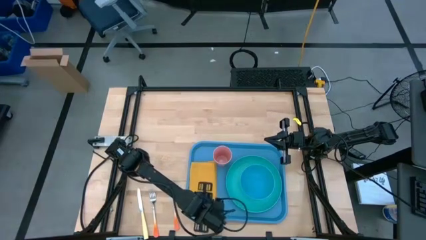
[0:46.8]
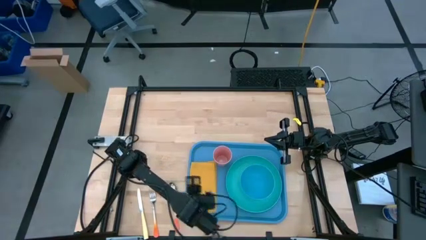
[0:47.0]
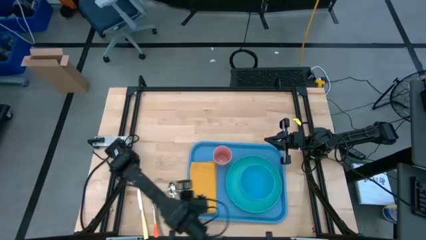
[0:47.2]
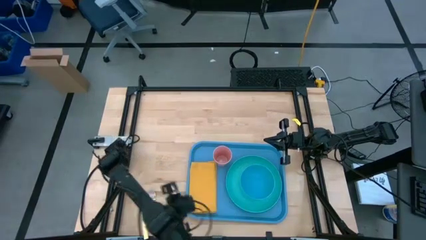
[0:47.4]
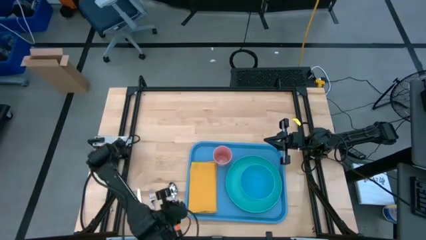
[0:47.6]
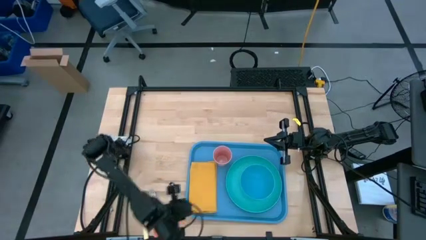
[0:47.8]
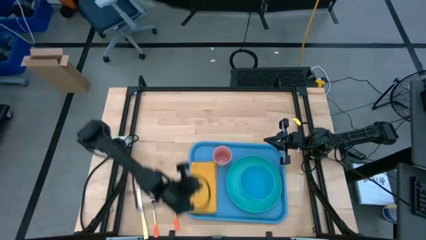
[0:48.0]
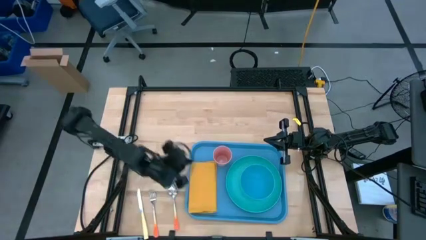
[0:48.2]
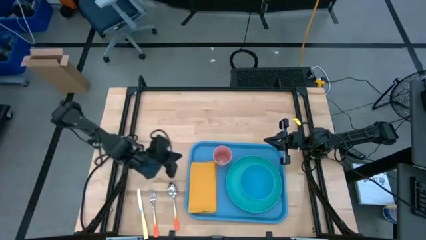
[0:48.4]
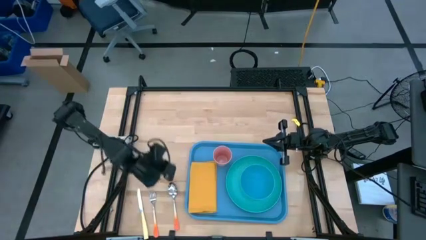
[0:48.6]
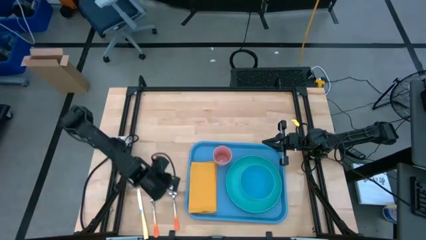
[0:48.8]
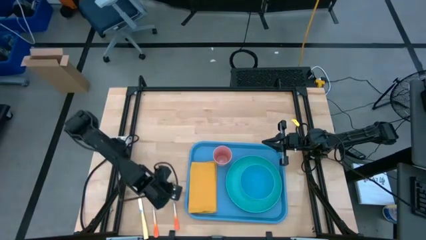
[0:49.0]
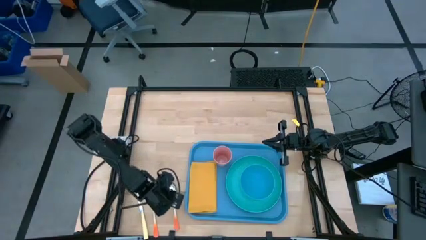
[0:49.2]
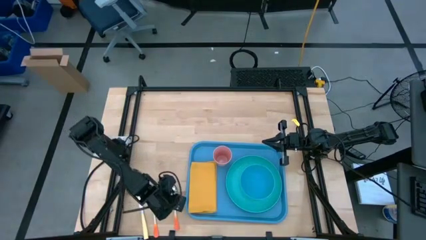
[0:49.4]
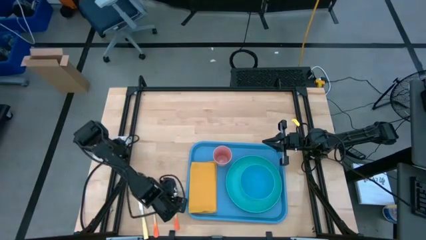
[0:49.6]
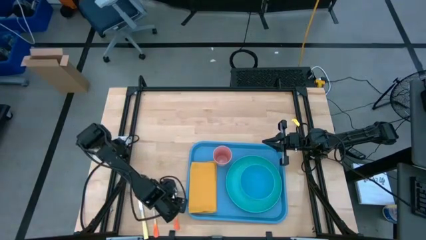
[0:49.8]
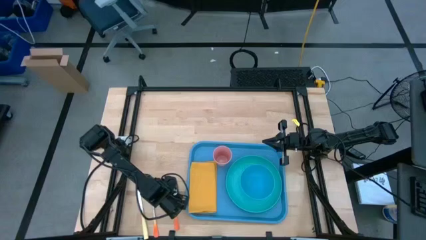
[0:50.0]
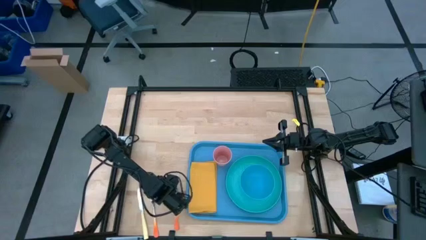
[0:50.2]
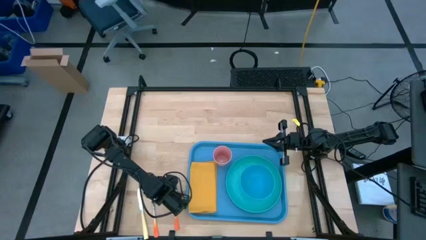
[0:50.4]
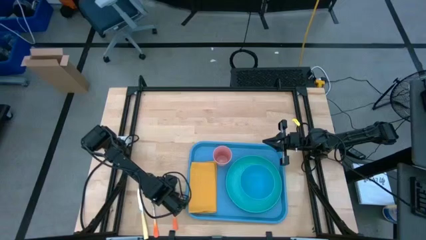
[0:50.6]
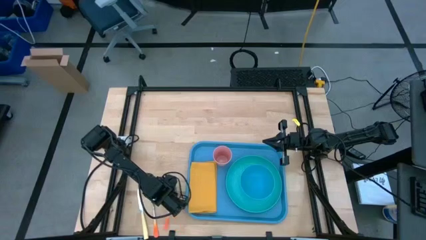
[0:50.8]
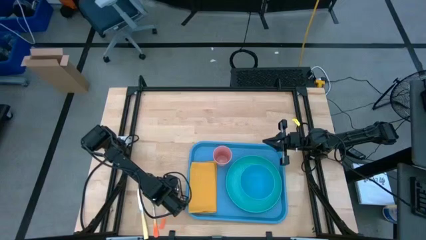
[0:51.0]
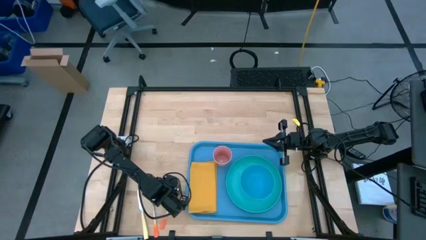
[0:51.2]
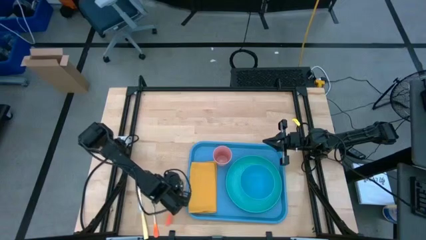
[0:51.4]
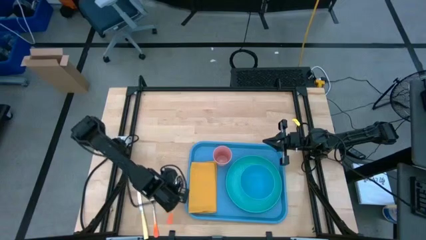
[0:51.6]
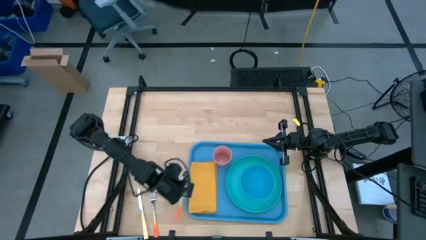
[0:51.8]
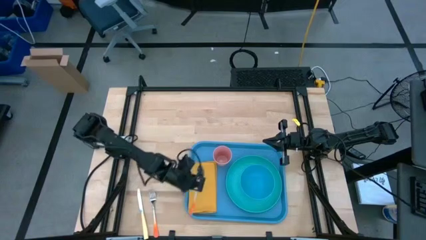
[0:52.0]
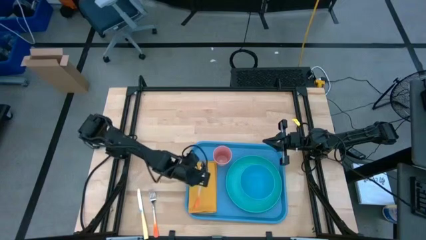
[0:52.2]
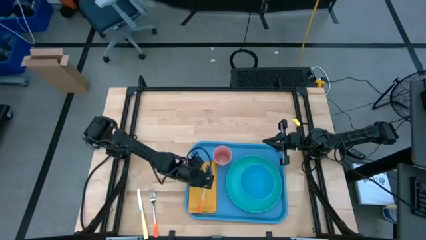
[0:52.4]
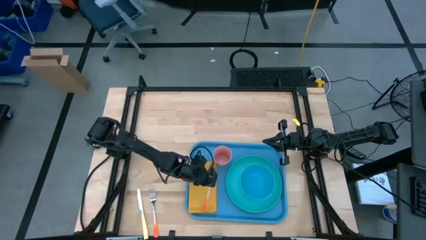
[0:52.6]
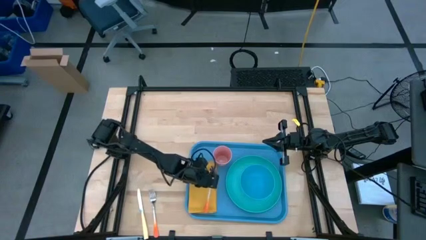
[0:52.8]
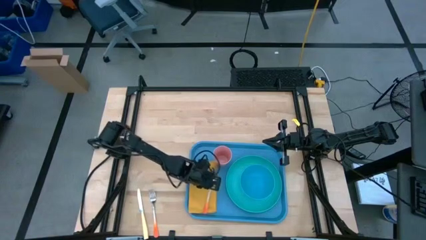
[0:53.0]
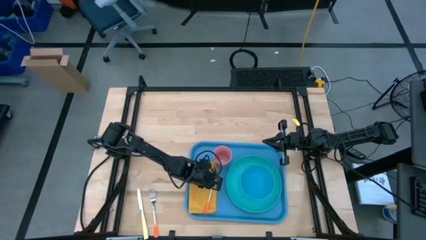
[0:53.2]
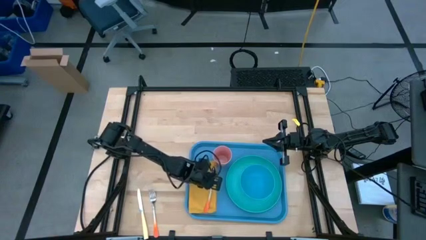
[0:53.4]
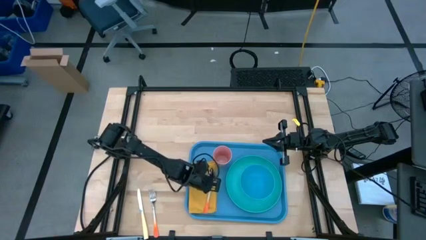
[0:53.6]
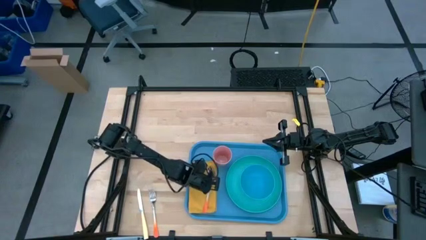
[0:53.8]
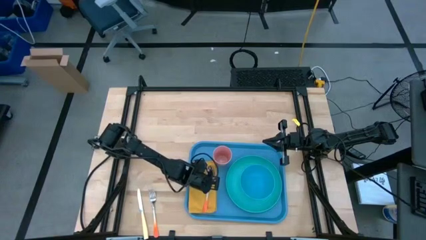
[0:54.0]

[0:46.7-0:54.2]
Task: Set up tray
Put the orange spoon on the orange napkin

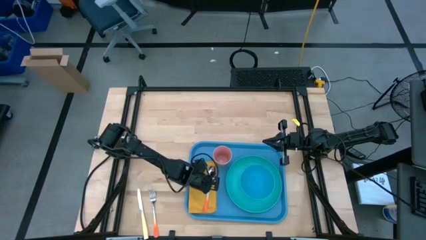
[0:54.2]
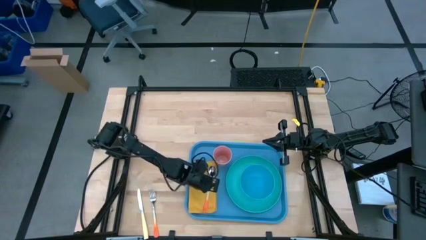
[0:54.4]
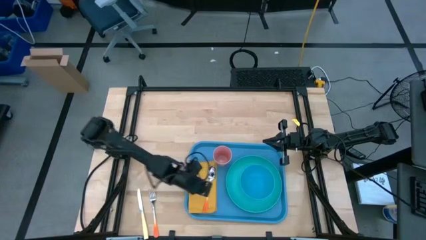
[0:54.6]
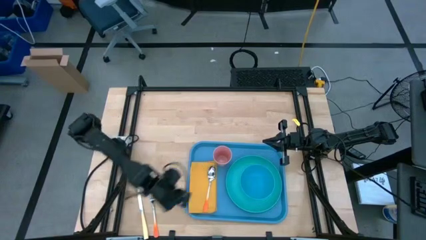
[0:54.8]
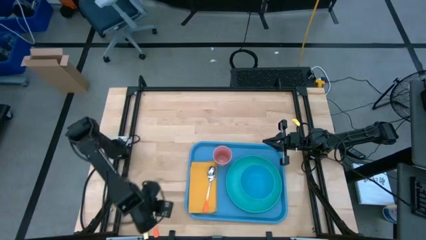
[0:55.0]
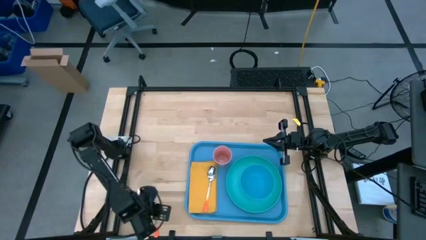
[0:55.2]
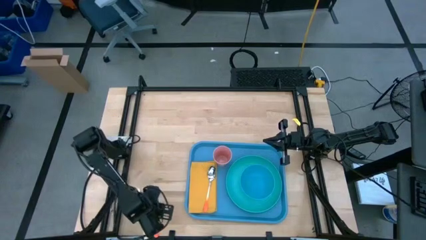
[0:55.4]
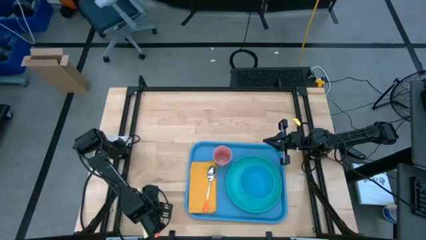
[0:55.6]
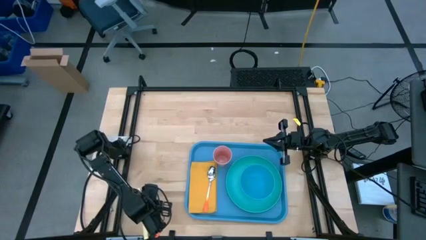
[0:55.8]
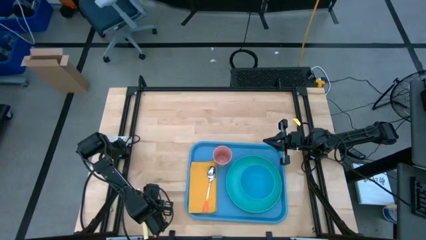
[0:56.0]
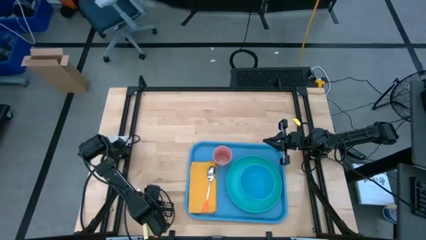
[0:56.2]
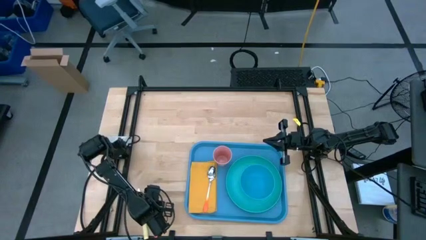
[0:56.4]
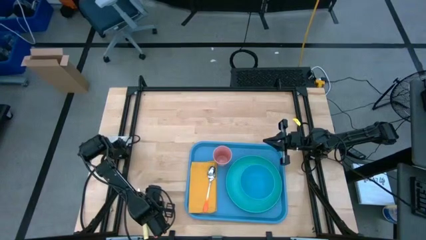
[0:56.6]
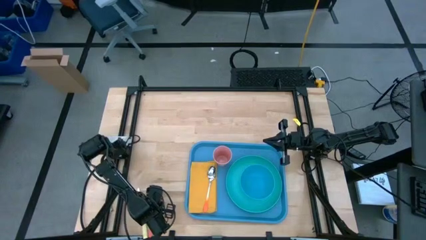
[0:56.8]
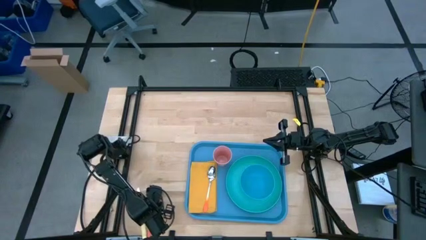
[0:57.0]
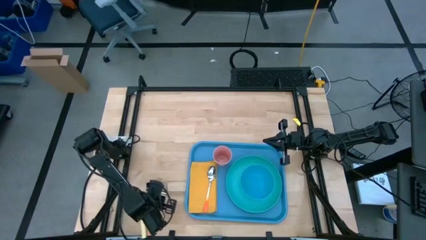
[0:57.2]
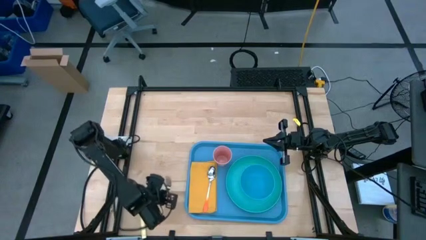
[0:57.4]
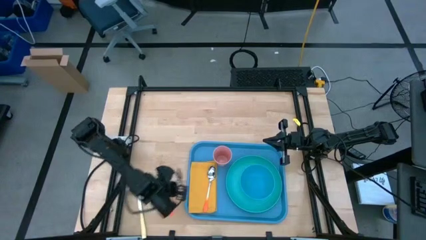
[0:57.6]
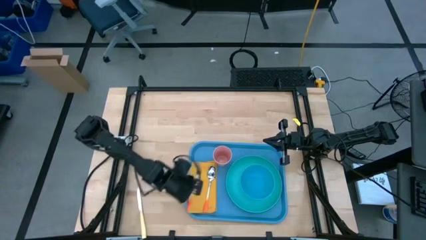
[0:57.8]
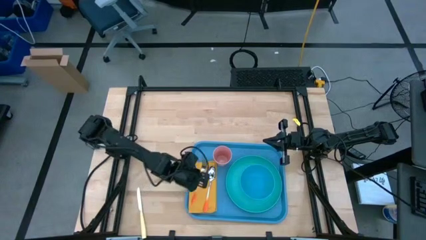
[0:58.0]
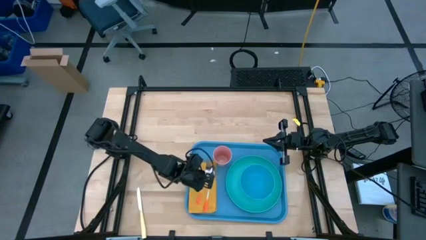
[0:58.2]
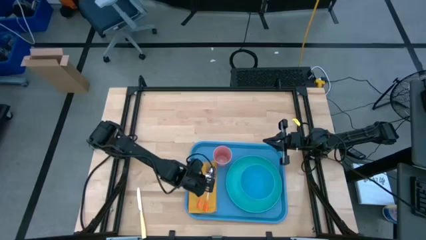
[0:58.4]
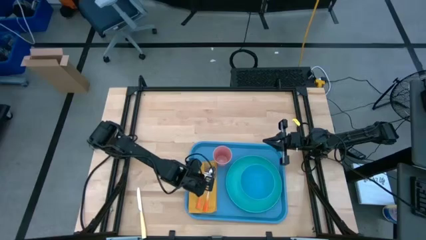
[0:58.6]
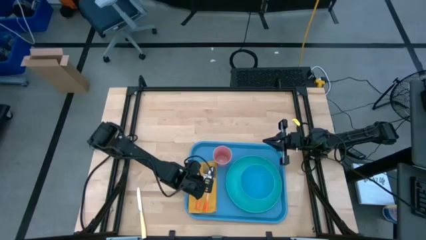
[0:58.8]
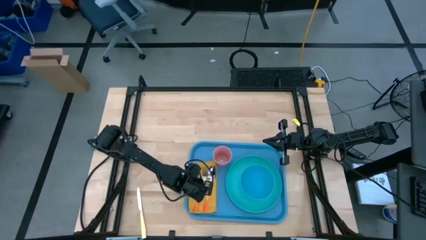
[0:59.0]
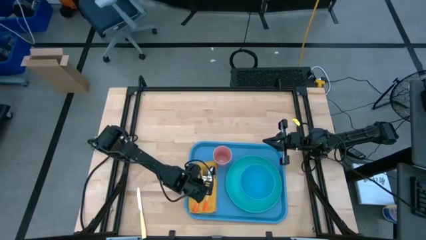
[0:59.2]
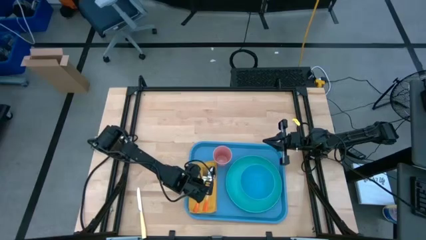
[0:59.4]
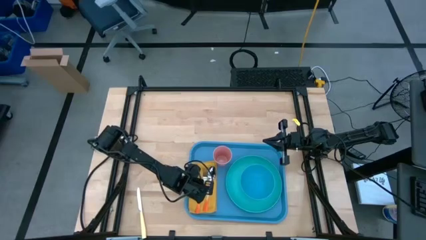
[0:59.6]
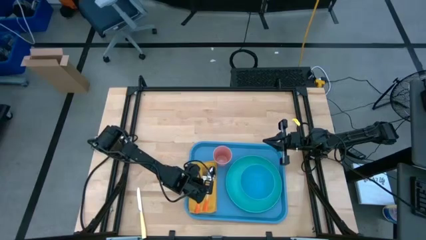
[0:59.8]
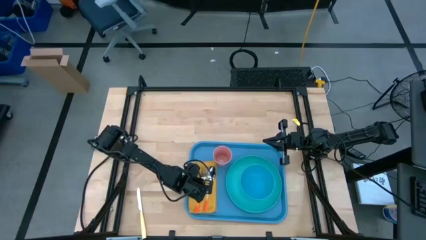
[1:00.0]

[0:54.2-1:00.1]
Put the orange fork on the yellow napkin to the left of the orange spoon
